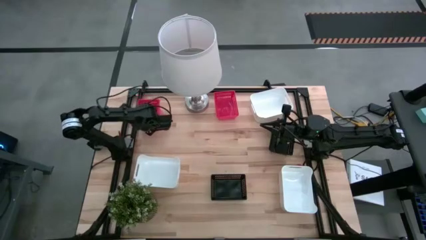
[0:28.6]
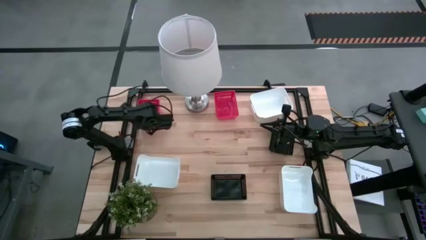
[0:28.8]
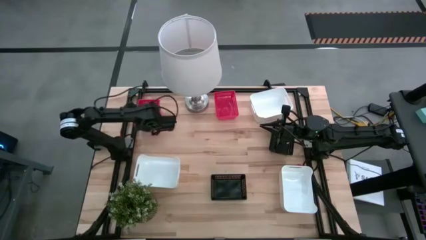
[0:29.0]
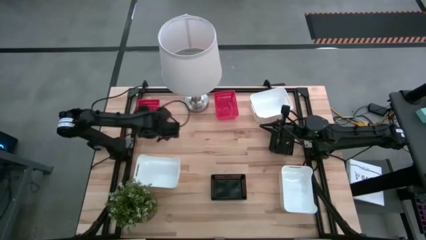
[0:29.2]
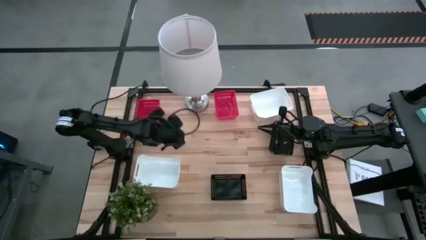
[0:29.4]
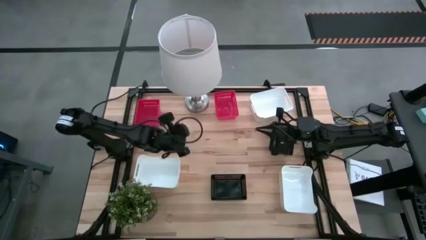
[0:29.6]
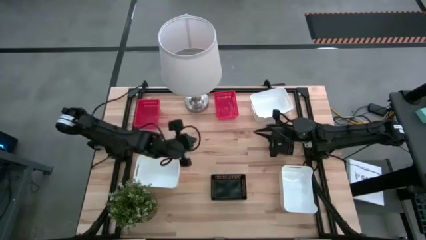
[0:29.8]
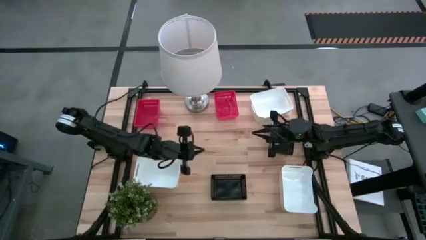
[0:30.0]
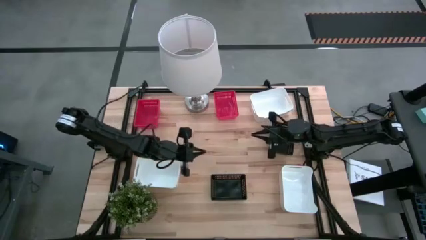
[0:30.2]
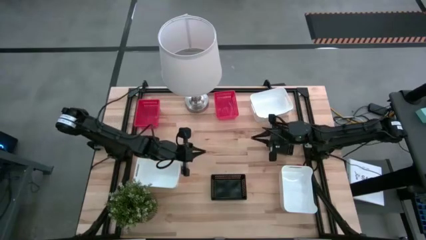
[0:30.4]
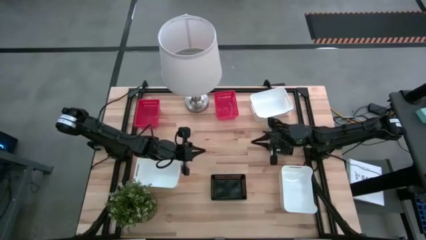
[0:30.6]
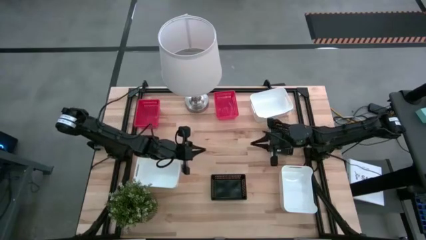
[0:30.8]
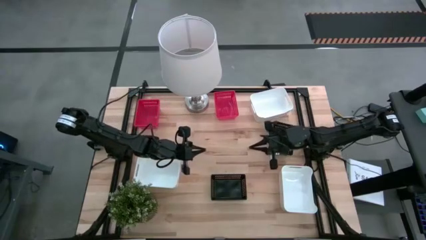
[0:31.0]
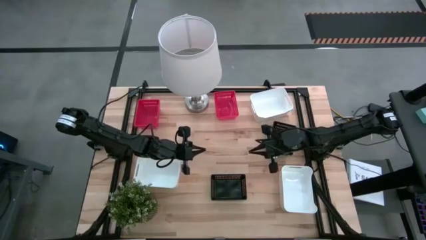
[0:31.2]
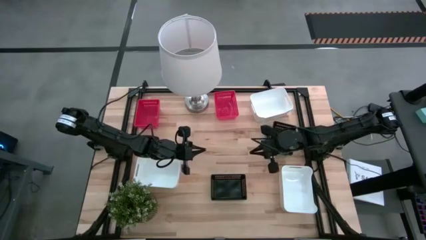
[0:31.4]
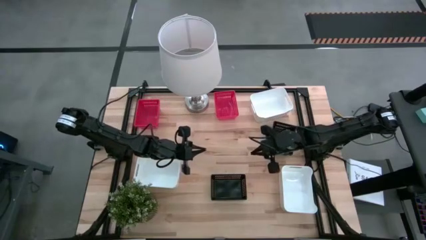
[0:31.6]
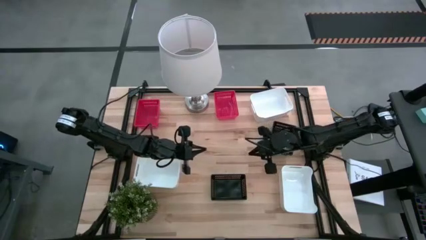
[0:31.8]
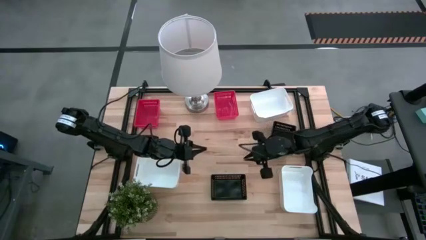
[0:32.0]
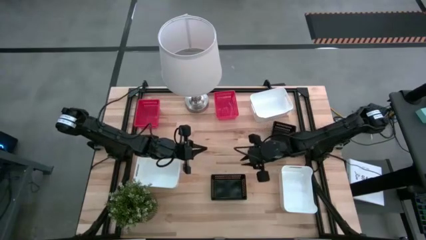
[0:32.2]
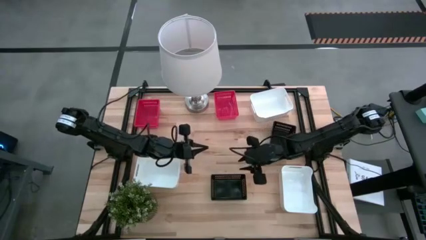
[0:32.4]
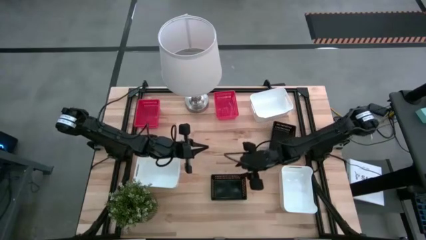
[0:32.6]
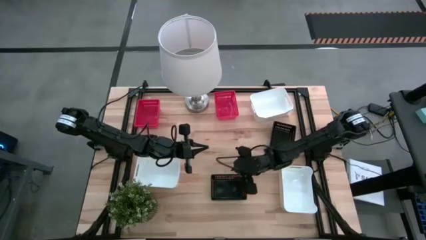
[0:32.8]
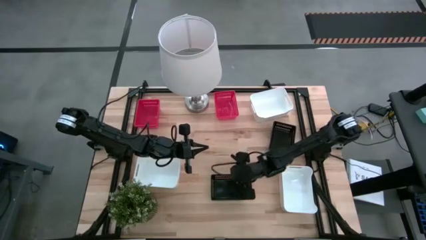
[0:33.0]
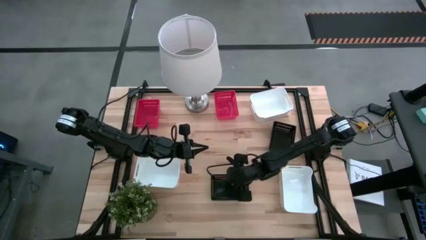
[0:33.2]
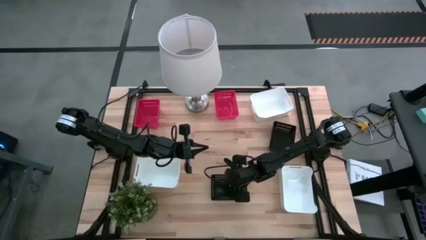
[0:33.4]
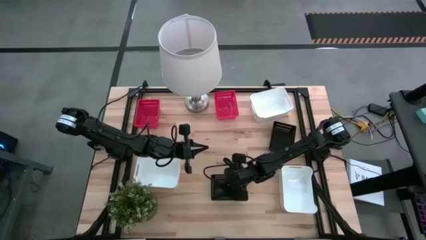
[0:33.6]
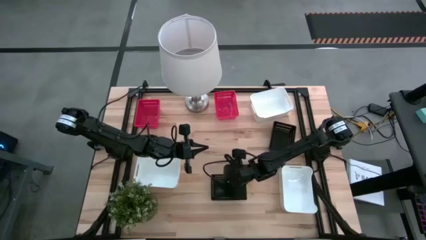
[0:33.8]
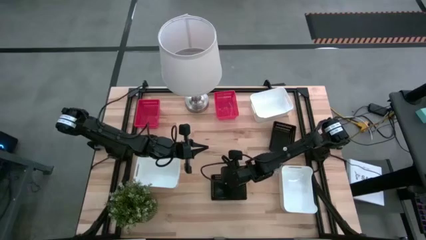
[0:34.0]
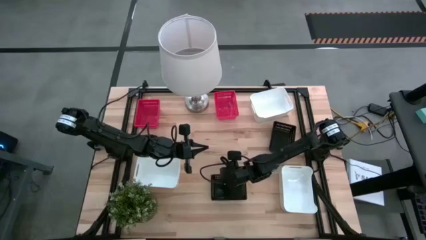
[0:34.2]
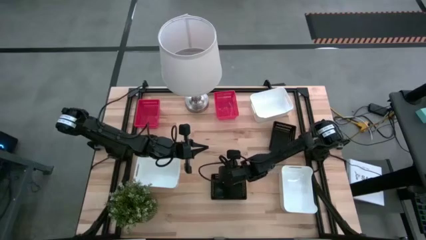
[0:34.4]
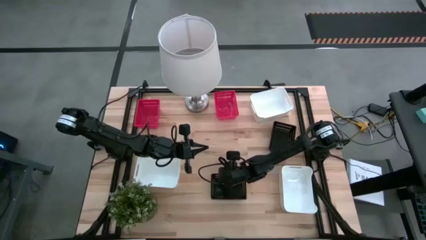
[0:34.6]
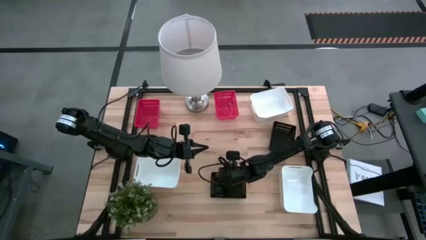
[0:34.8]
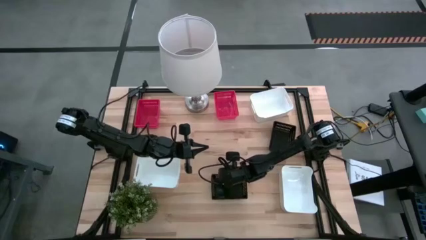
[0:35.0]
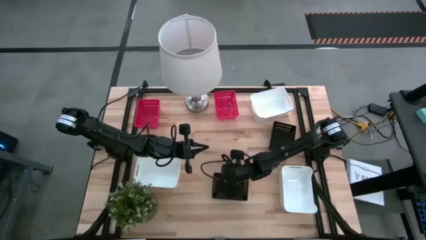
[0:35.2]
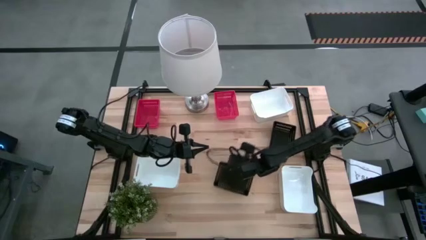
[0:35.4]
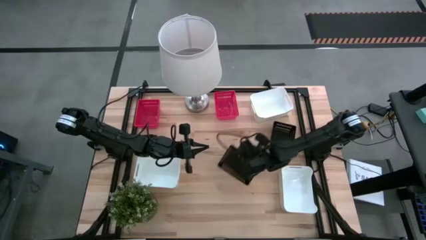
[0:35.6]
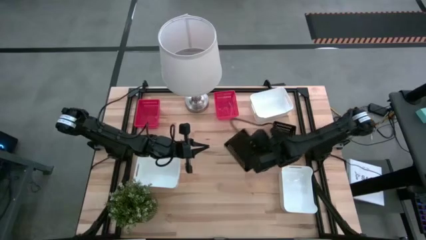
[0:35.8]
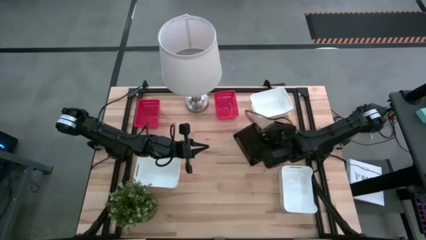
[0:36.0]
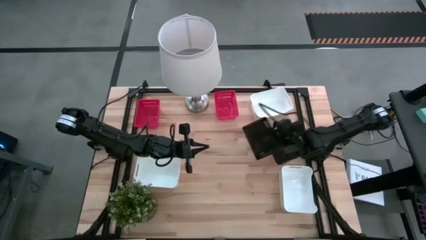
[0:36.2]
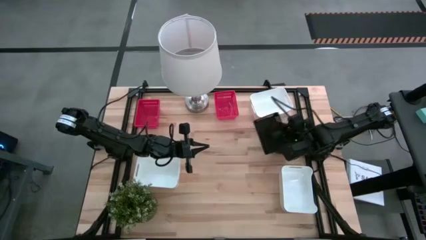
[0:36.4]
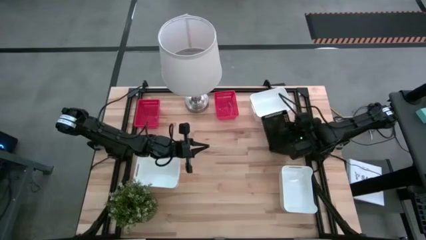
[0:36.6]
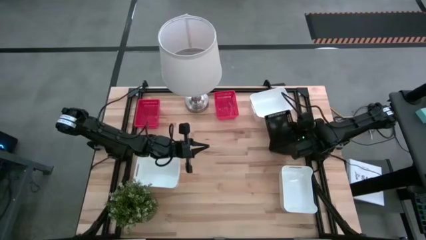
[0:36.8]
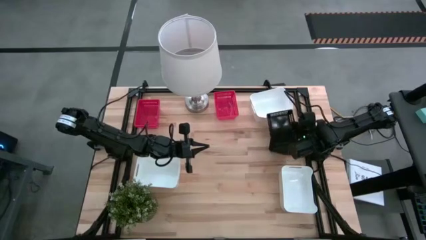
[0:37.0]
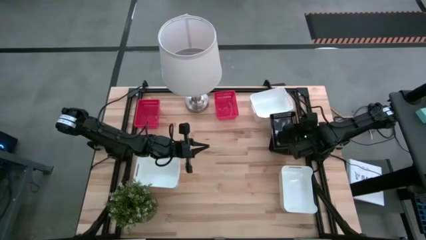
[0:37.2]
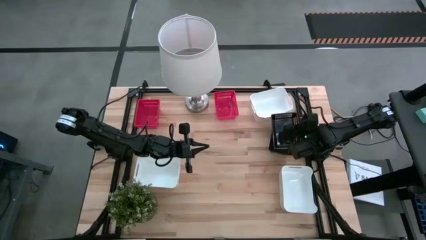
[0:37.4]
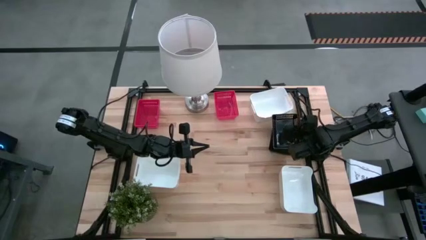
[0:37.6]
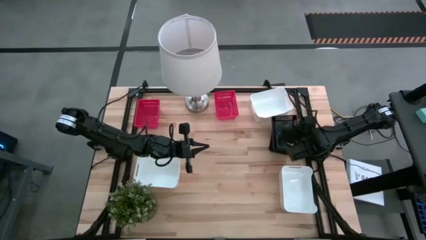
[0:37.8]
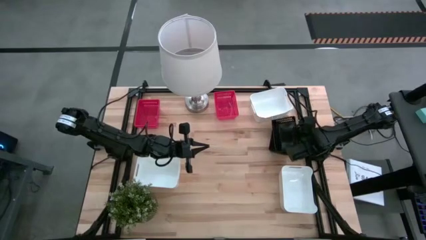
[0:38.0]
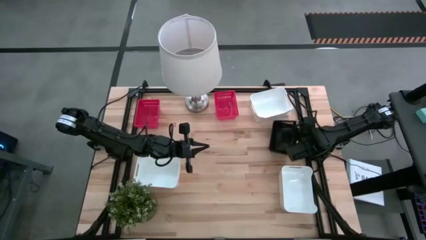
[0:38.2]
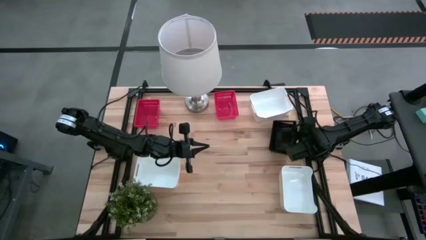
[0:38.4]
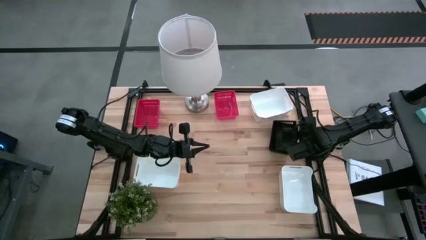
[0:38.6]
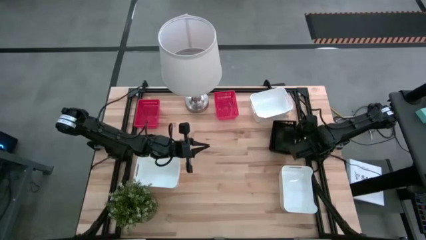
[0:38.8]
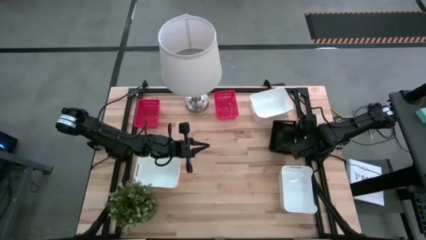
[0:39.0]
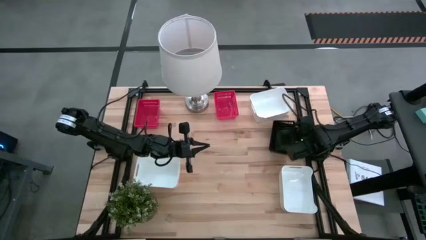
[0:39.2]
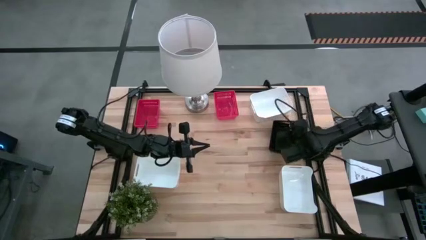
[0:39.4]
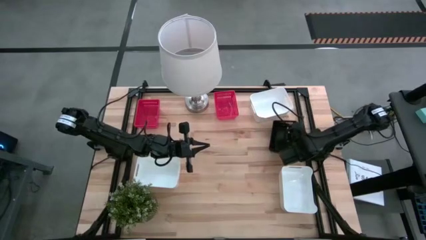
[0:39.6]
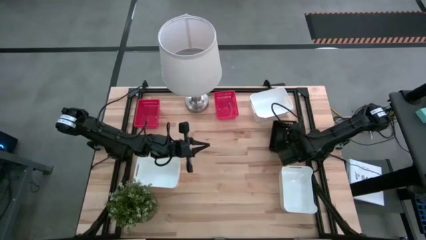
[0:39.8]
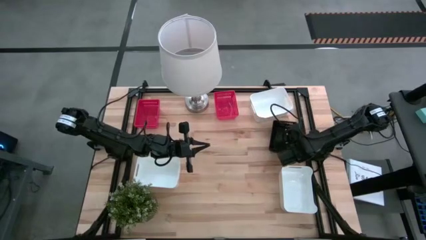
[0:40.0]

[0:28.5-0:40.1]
Stack the bottom black bin on top of the stacked black bins

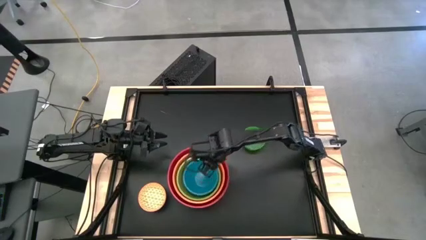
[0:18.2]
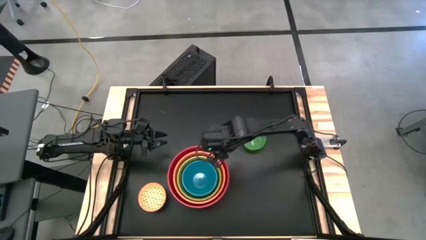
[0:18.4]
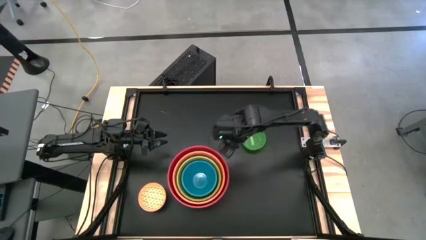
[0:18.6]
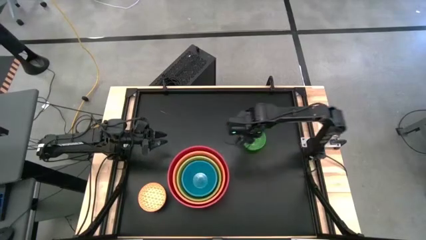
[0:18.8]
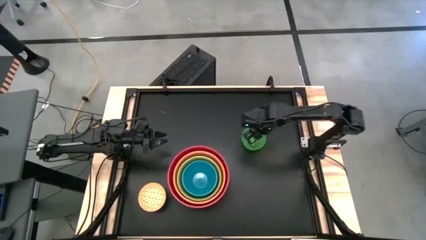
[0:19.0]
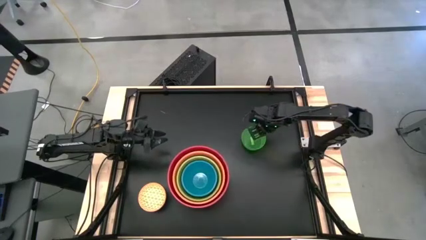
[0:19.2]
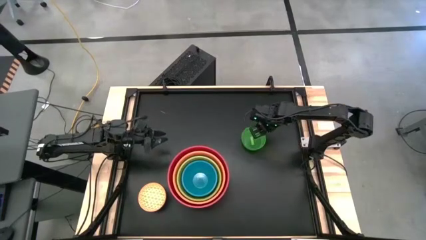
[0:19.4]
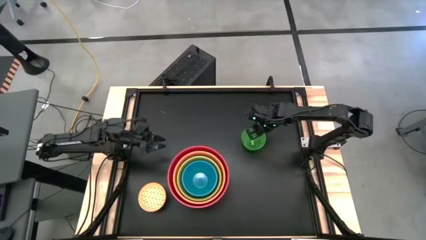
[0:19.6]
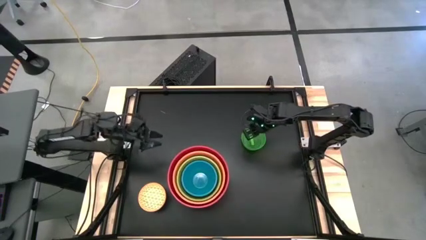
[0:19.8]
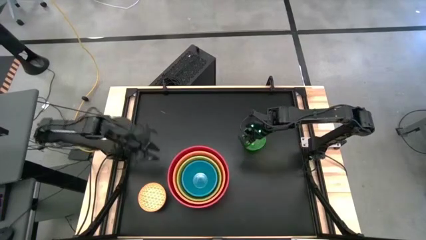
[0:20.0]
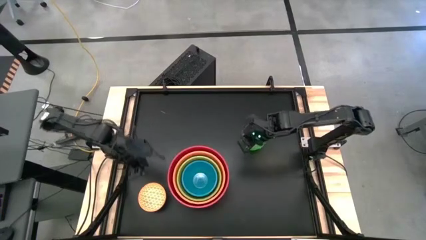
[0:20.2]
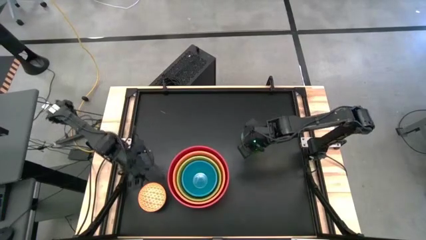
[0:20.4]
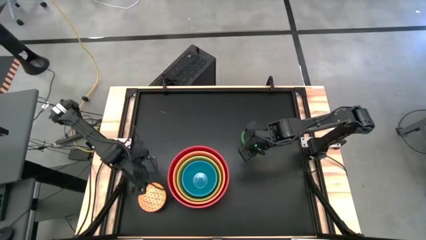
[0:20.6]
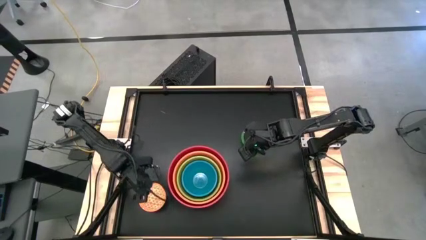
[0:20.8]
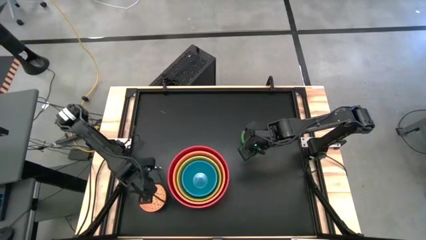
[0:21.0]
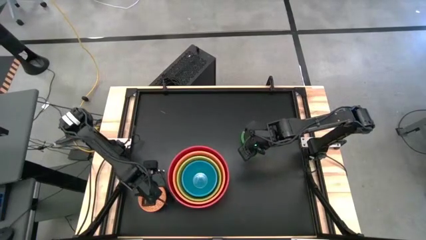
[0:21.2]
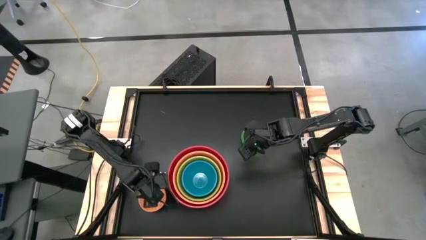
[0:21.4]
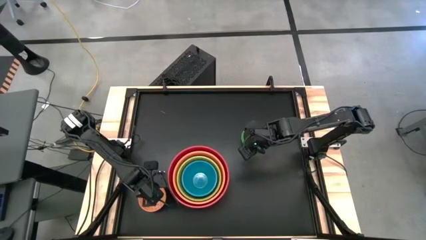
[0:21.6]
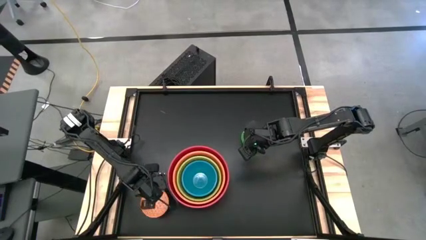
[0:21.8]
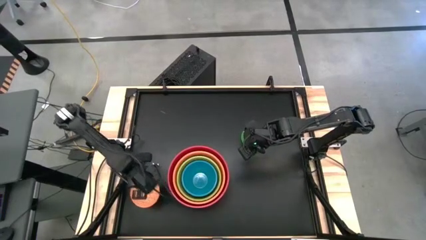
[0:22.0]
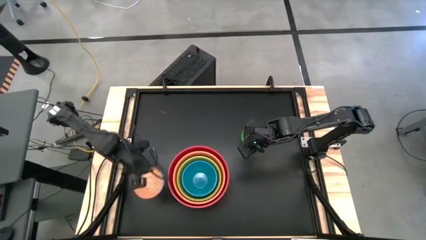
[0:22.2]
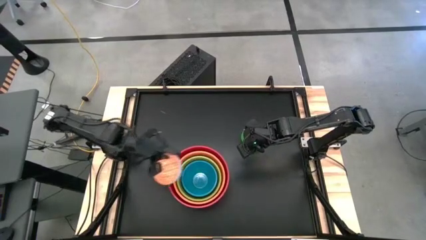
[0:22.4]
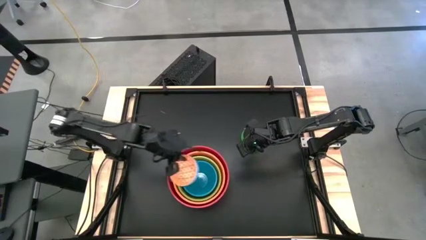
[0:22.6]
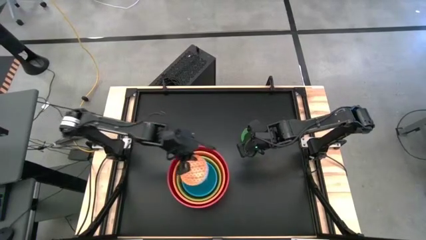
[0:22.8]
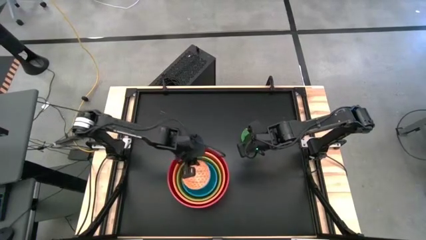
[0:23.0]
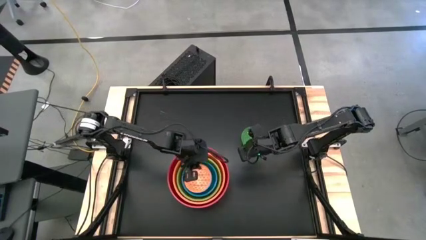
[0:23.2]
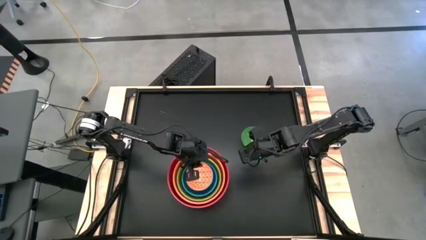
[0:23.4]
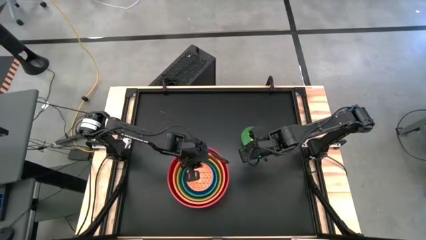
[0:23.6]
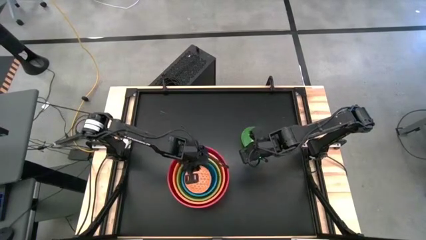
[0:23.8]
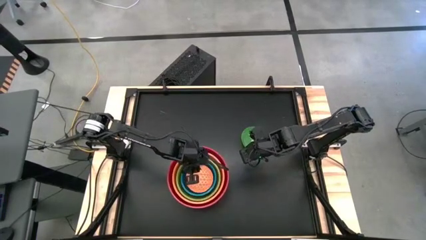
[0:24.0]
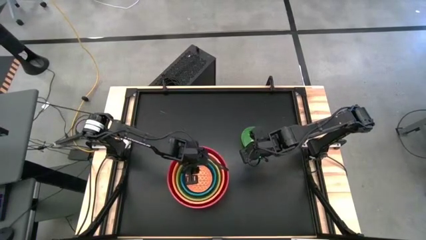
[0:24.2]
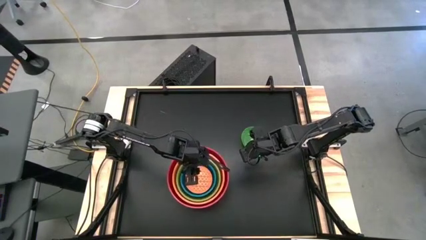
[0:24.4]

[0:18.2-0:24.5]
Stack the orange patterned bowl on top of the blue bowl
